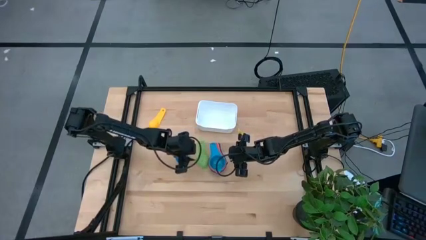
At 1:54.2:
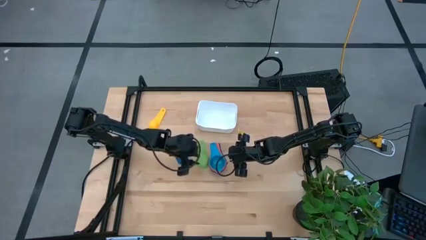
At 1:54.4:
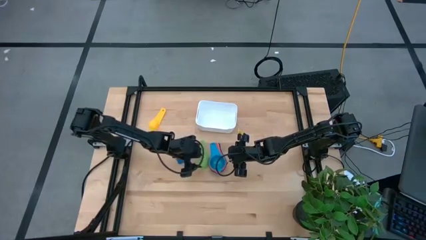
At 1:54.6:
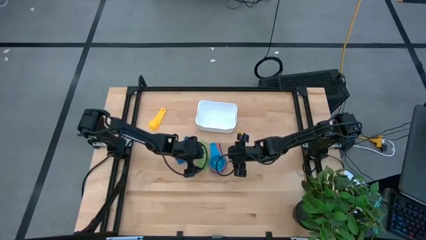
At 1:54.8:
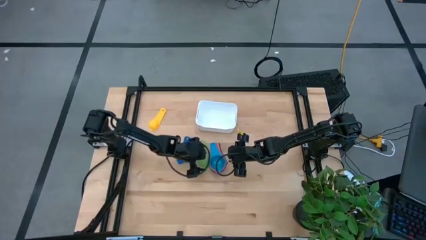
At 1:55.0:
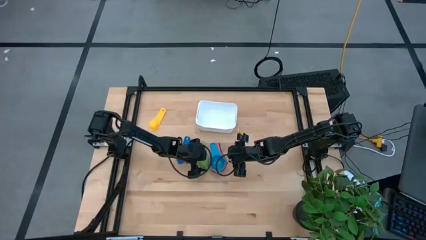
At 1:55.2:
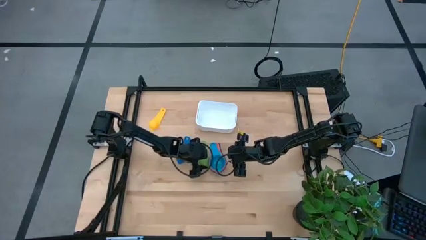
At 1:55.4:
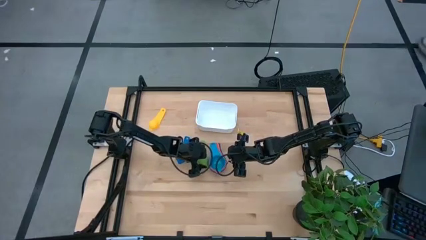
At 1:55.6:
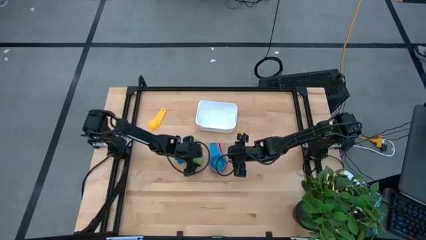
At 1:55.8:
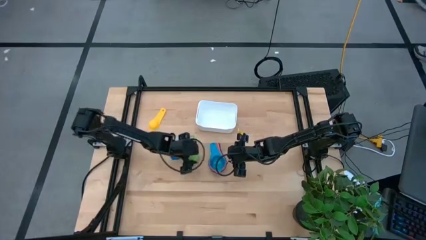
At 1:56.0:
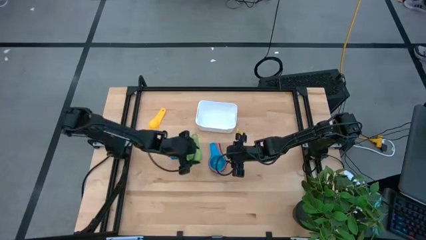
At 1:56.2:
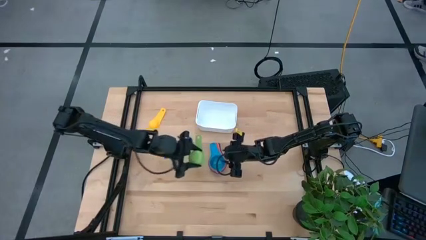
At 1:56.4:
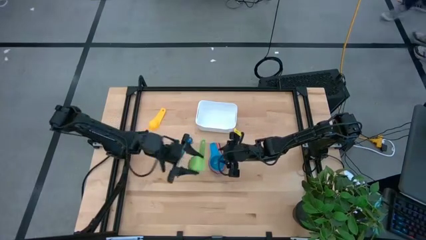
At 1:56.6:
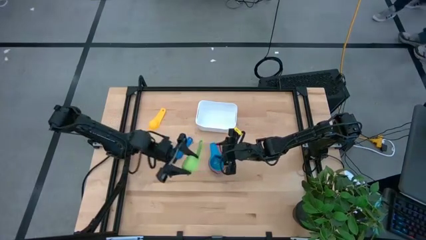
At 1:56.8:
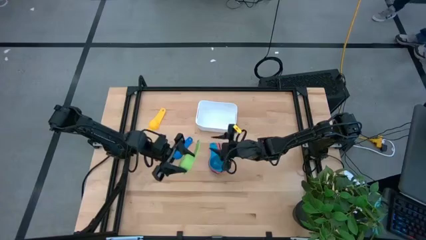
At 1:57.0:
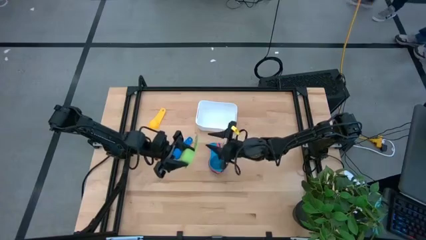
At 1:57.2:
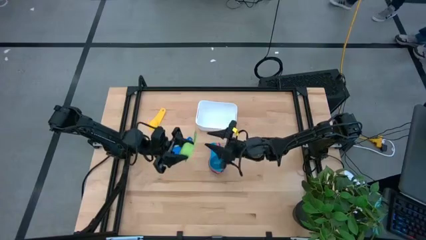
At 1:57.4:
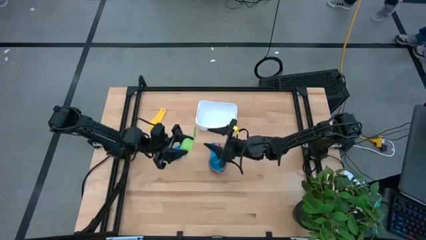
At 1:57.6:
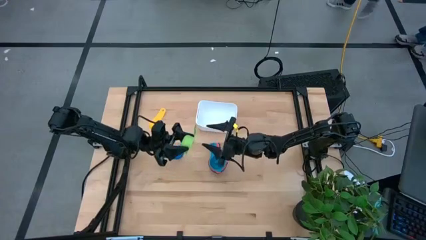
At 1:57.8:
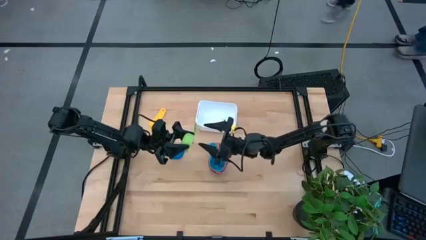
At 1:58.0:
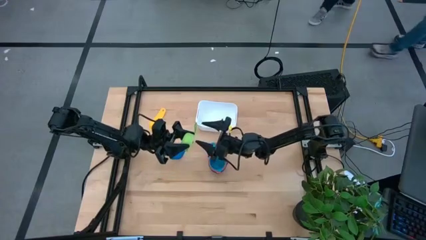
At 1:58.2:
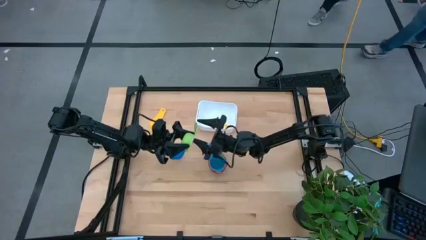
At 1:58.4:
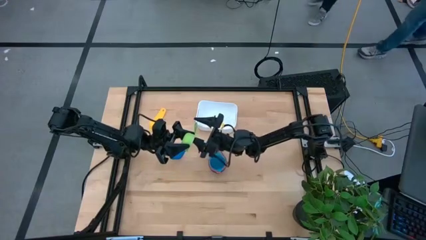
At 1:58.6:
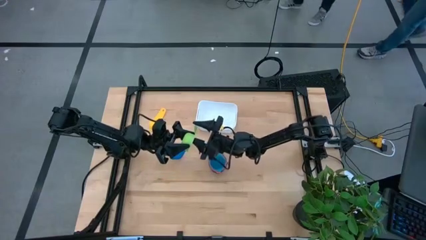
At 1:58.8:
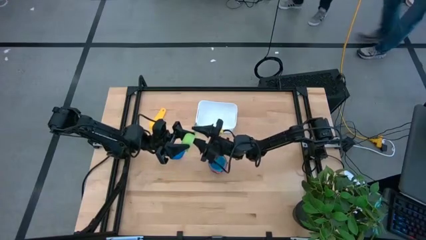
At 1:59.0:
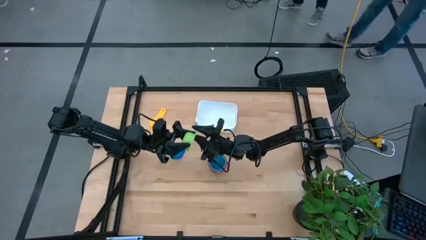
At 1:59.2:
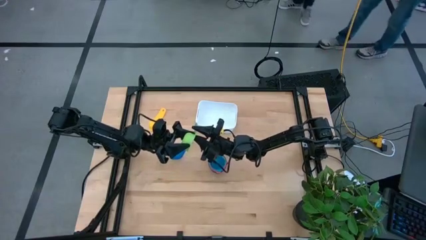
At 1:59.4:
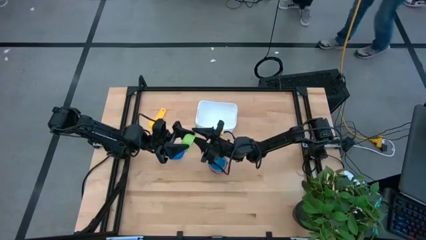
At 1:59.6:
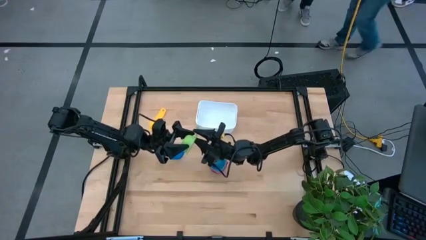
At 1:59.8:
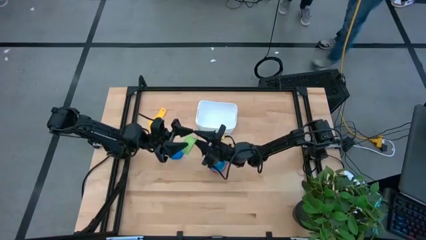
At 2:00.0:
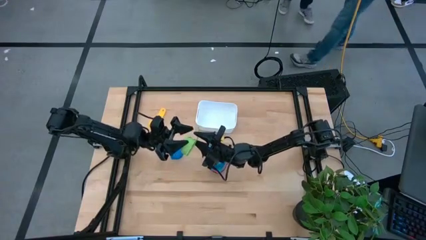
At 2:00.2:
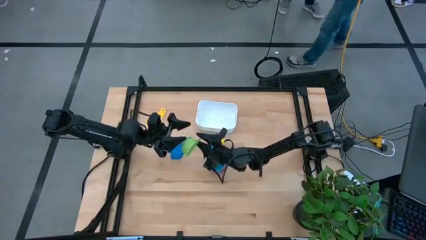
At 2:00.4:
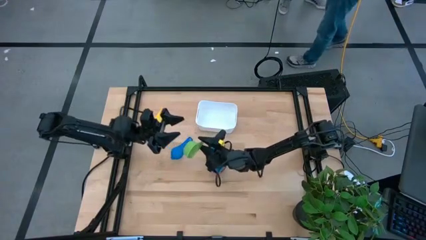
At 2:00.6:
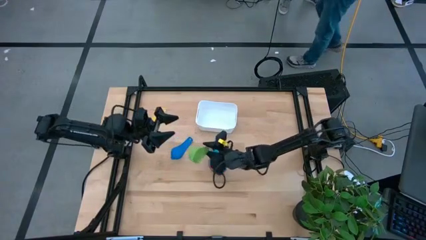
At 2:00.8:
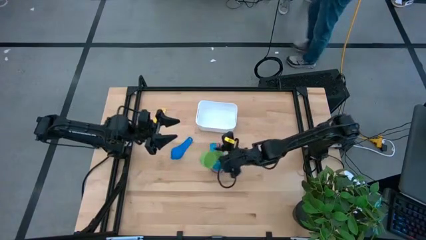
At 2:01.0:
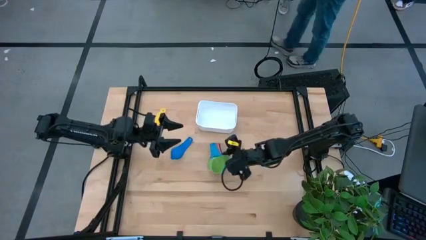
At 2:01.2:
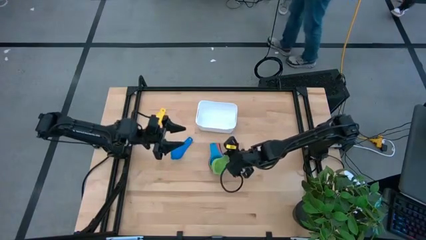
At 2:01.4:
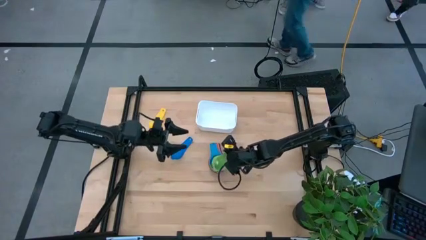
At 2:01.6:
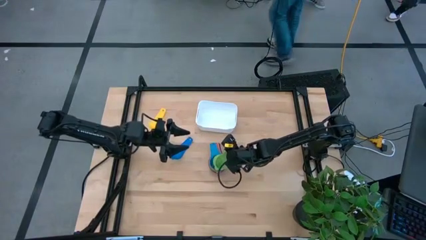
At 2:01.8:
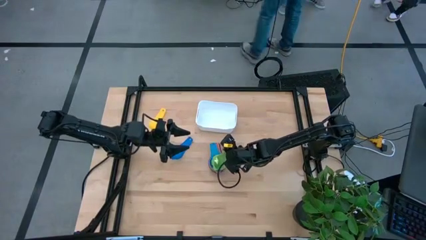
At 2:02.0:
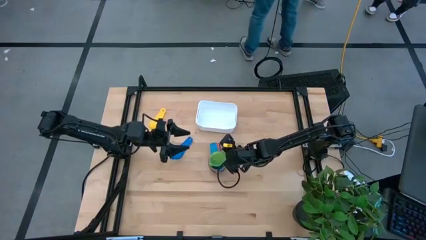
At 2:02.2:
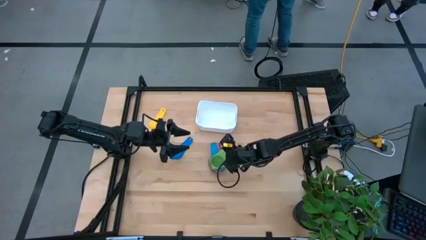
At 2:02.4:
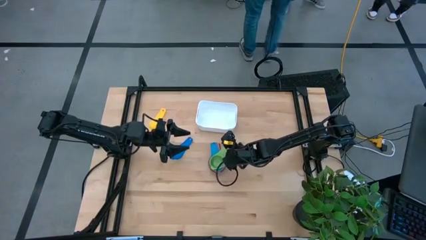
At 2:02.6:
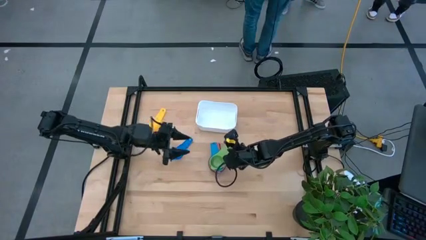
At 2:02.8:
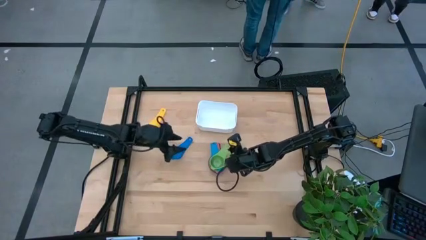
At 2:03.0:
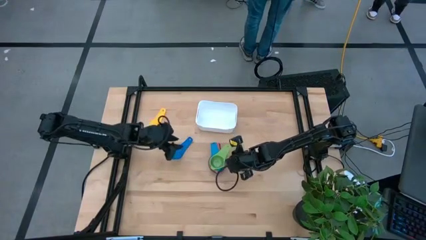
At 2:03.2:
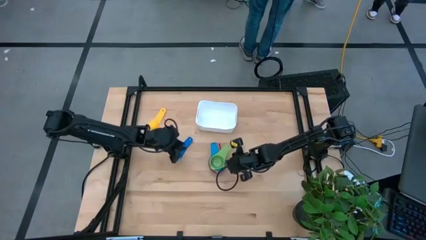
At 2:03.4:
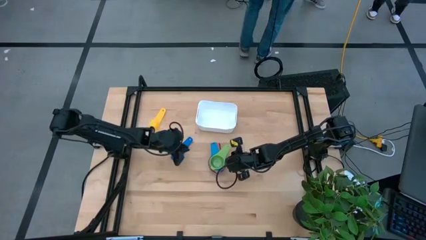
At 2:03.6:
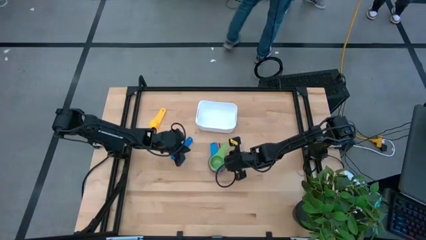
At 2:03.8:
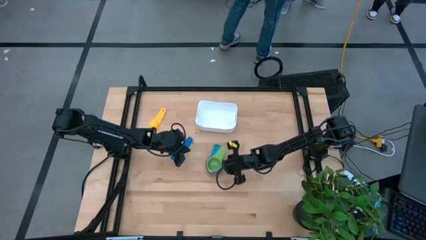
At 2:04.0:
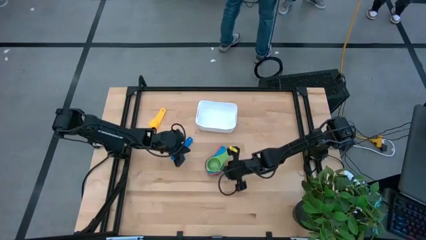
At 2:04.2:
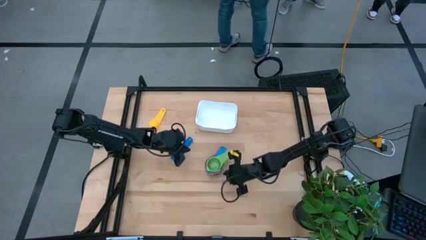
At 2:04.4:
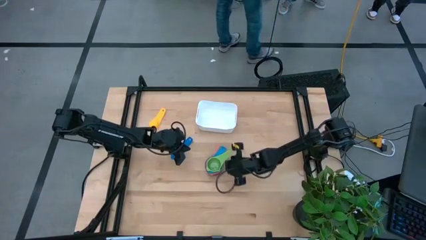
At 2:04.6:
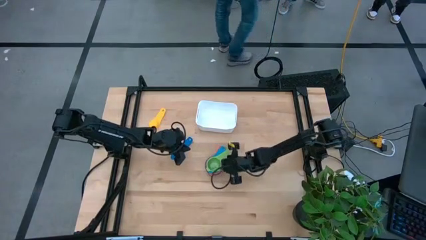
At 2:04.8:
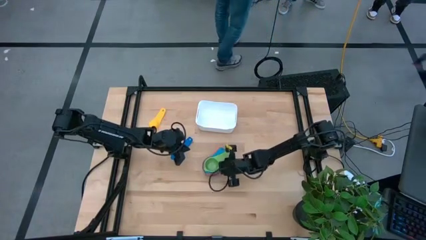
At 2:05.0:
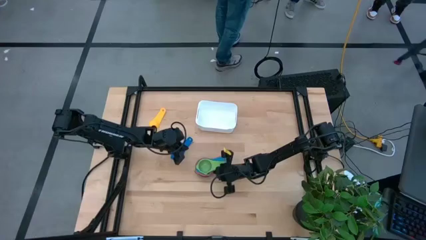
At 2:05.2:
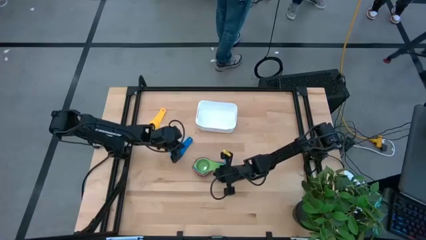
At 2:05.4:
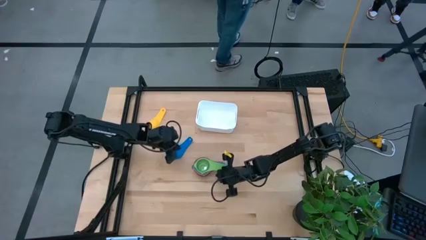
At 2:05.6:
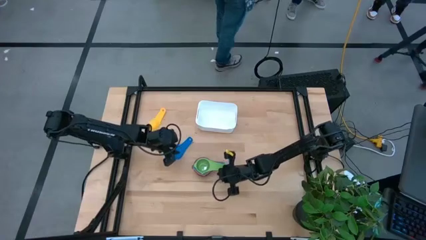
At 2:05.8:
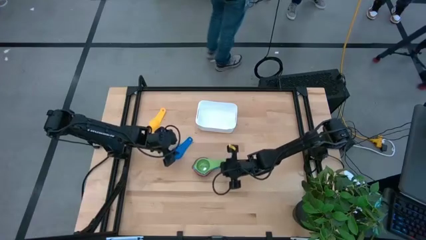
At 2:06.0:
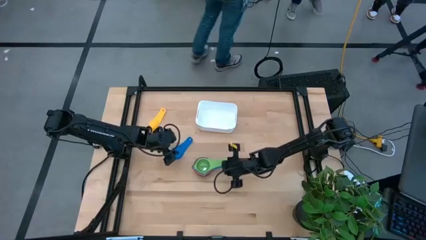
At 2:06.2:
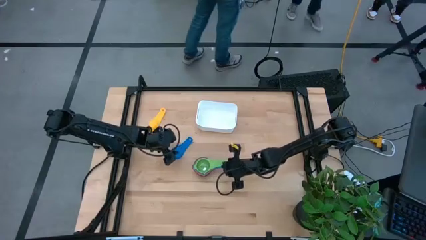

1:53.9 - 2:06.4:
Task: Nest measuring cups in basket
Stack the green measuring cup on top of the light blue measuring cup

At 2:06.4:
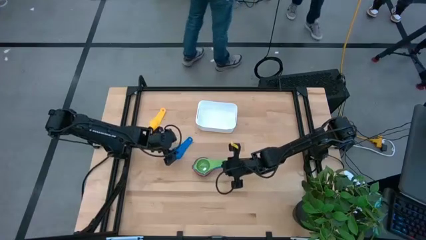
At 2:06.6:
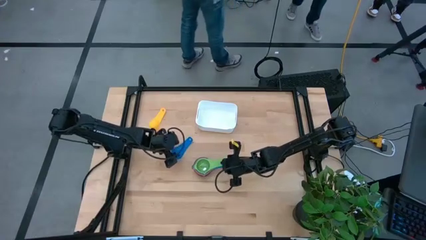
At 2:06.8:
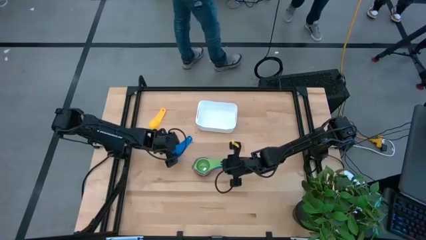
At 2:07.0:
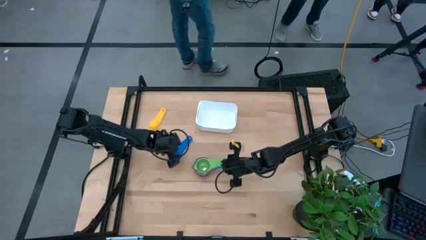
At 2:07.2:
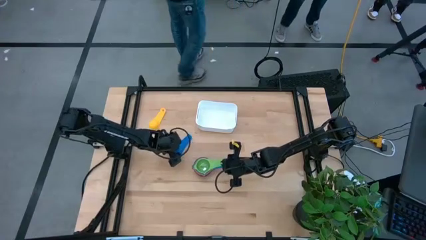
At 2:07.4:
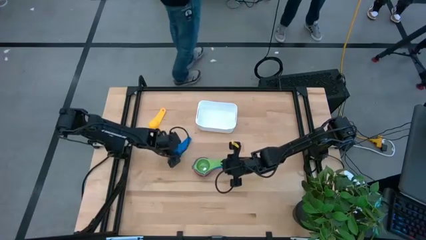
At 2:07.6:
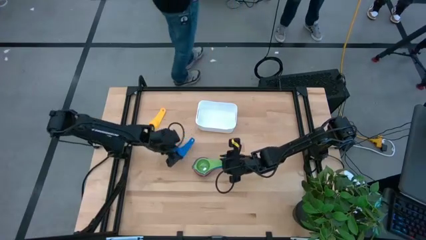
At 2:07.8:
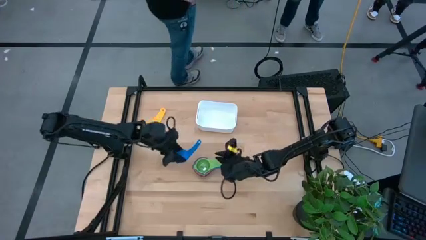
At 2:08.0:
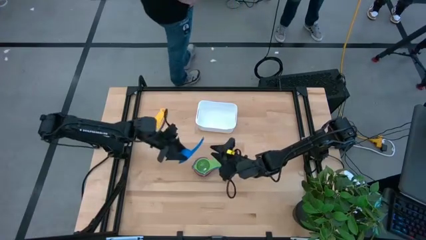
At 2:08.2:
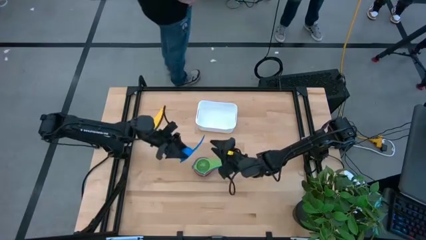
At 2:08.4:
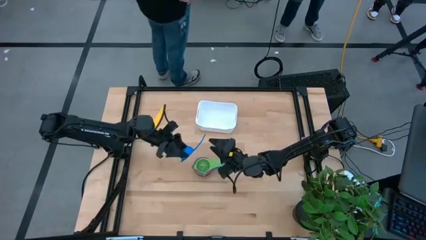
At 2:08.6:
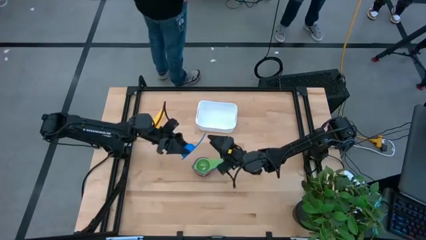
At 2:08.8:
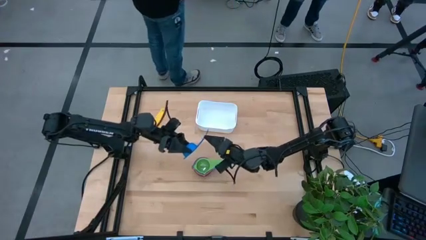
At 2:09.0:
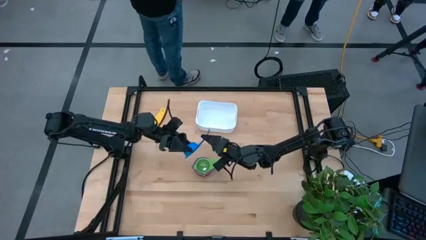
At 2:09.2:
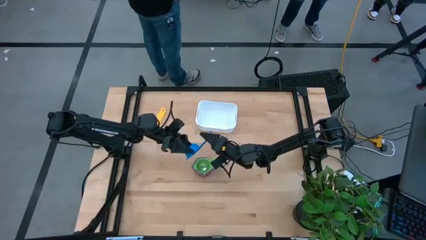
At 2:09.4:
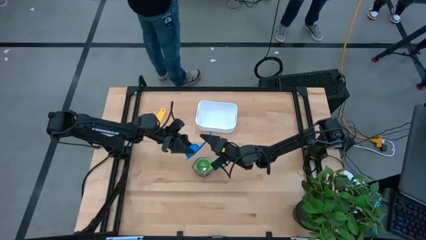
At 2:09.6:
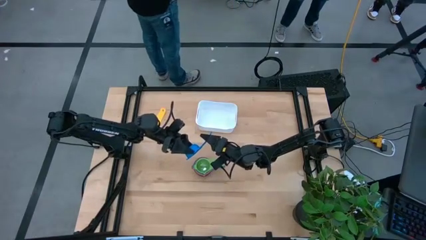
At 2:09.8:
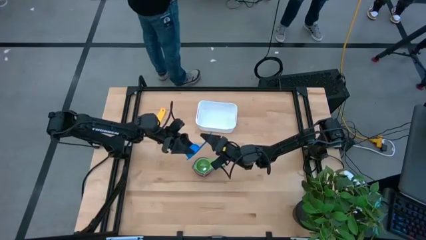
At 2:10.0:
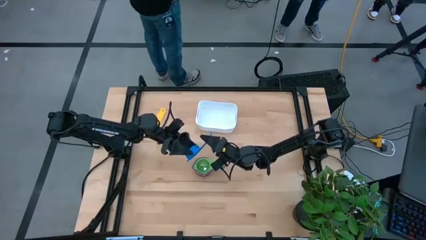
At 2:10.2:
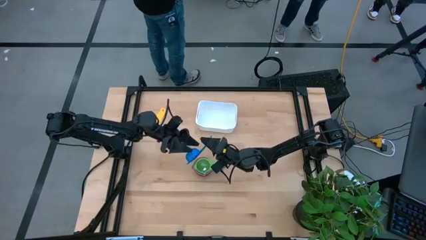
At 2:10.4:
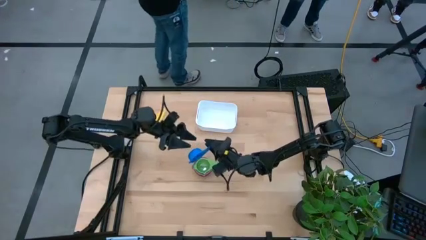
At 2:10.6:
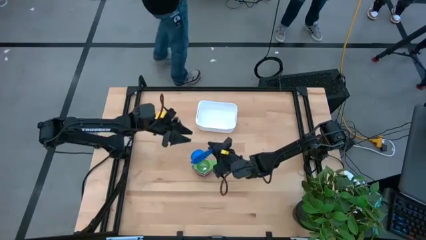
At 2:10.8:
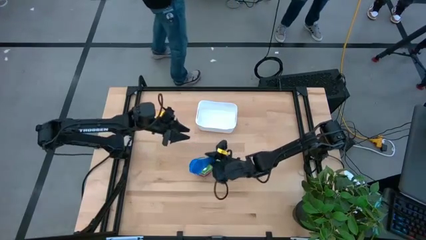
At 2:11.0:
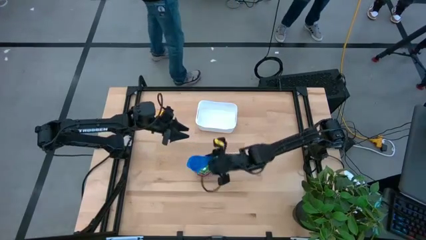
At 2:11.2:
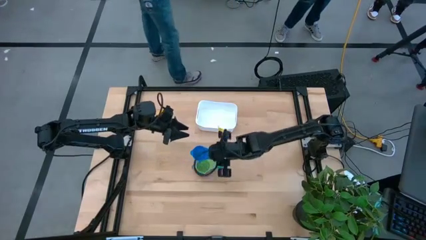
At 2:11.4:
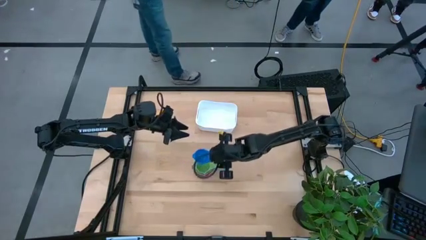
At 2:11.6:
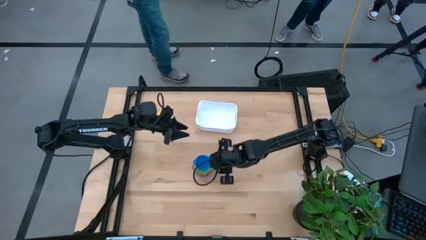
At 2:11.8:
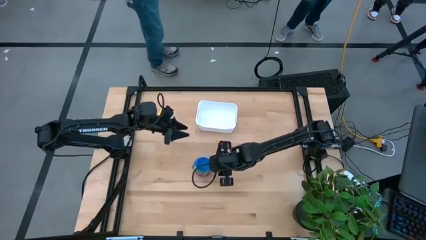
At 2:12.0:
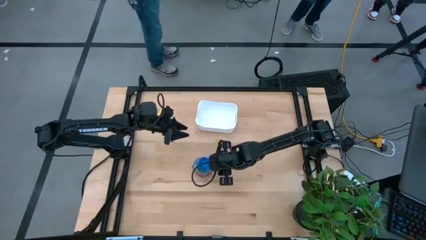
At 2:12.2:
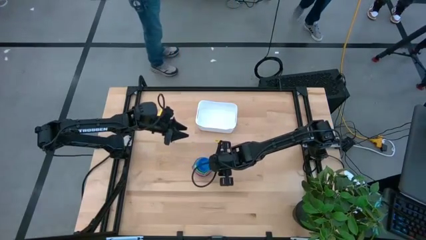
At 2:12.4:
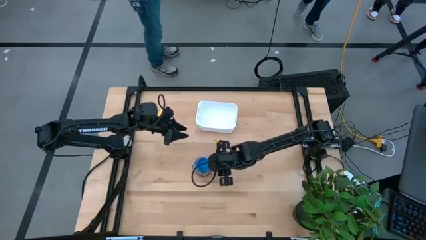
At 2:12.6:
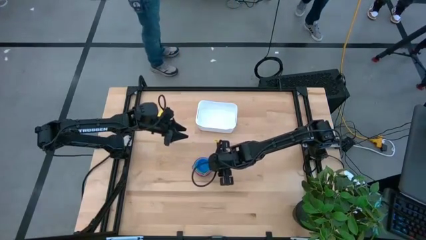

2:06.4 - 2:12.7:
Stack the dark blue measuring cup on top of the green measuring cup
